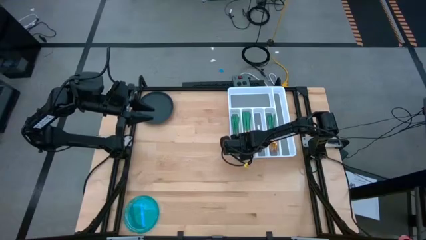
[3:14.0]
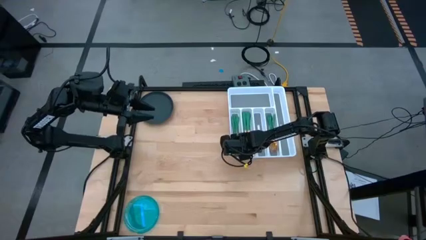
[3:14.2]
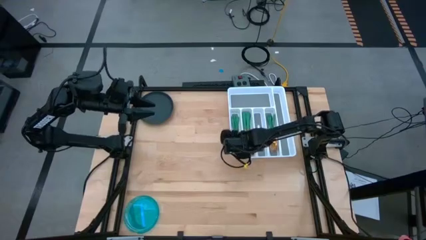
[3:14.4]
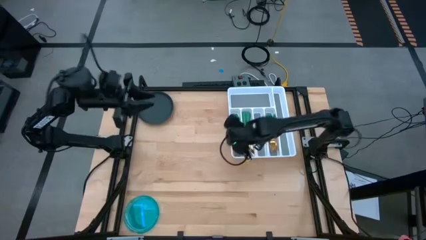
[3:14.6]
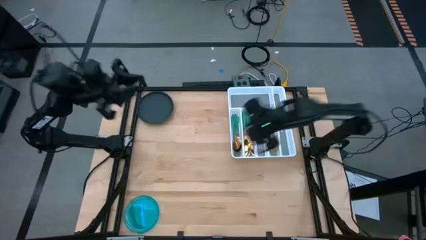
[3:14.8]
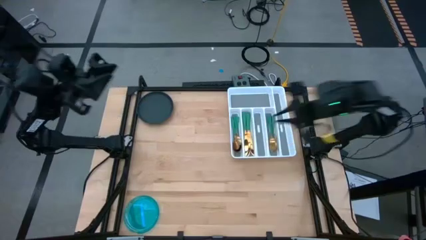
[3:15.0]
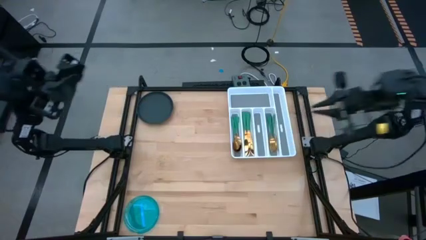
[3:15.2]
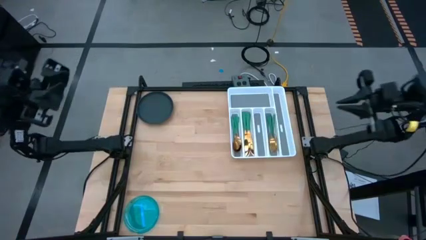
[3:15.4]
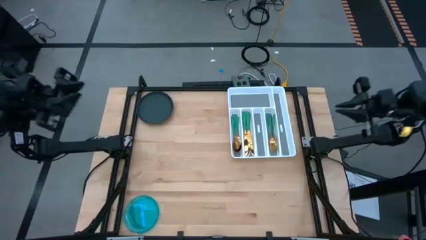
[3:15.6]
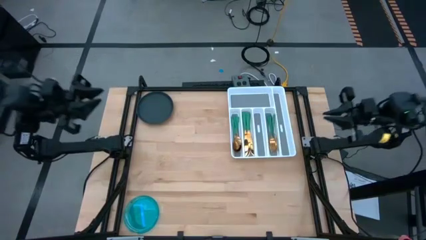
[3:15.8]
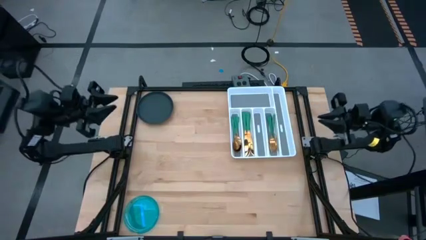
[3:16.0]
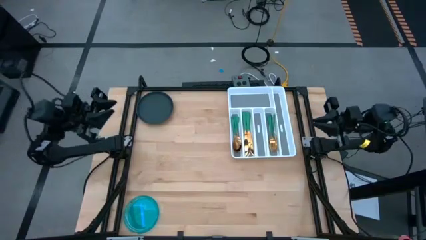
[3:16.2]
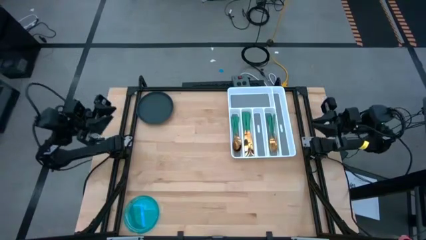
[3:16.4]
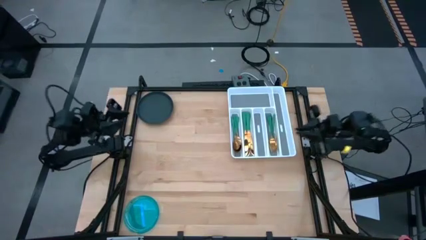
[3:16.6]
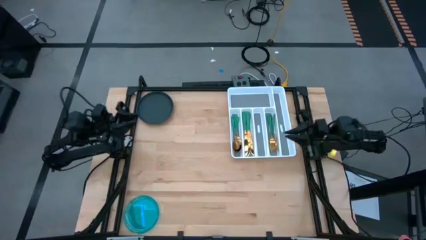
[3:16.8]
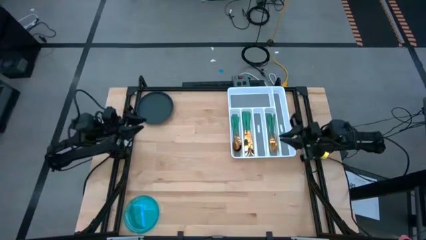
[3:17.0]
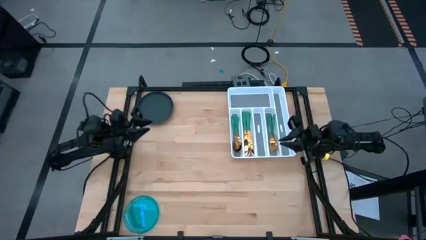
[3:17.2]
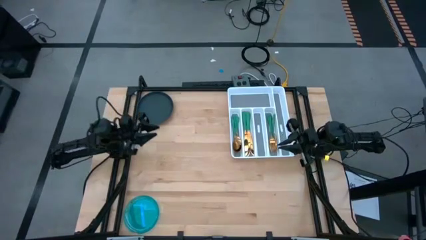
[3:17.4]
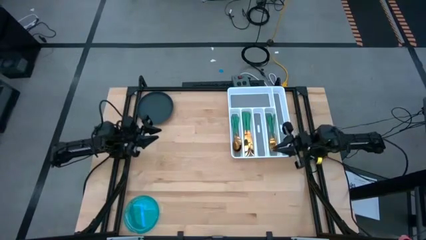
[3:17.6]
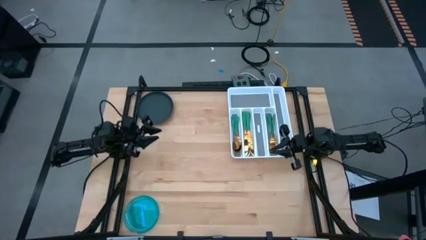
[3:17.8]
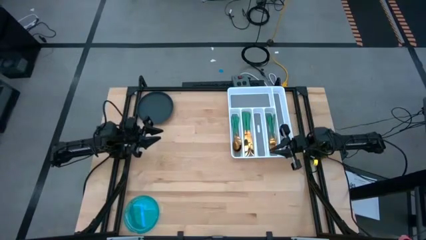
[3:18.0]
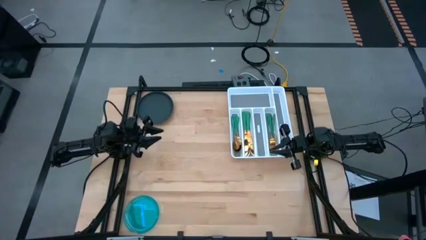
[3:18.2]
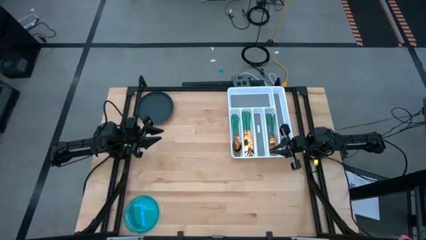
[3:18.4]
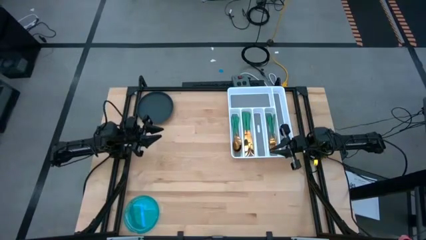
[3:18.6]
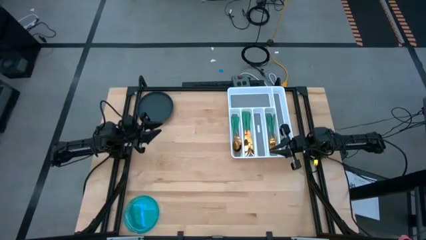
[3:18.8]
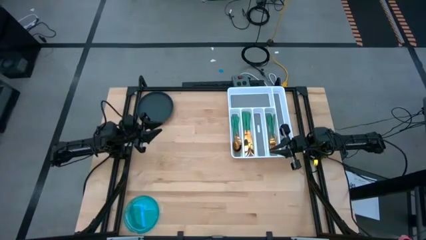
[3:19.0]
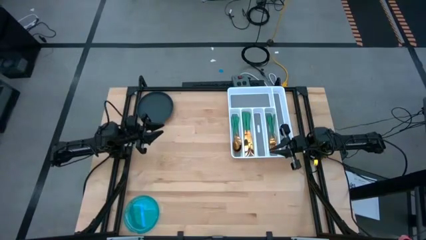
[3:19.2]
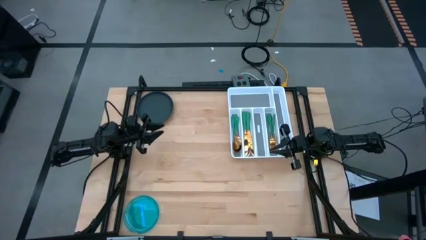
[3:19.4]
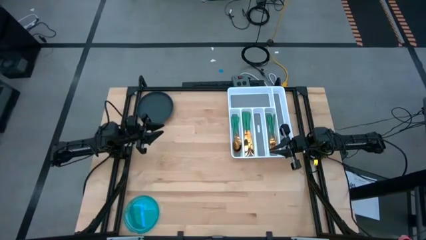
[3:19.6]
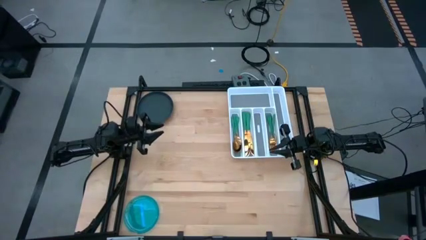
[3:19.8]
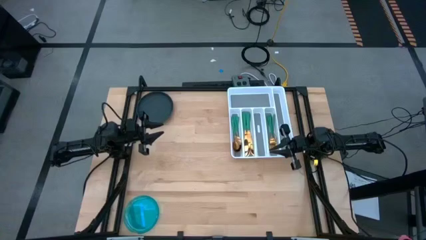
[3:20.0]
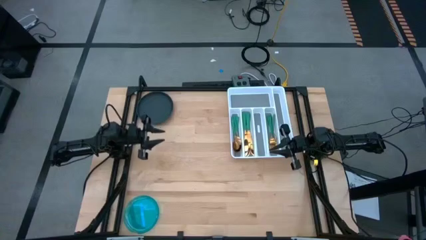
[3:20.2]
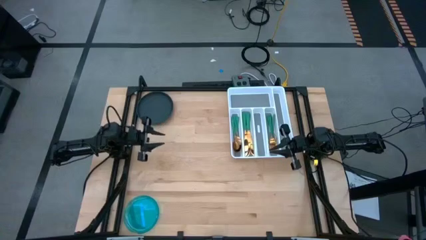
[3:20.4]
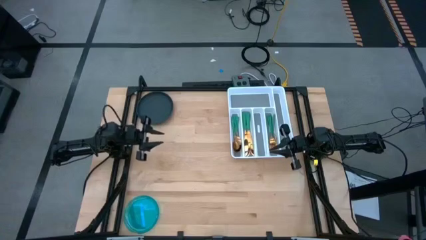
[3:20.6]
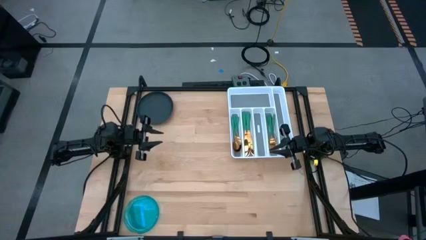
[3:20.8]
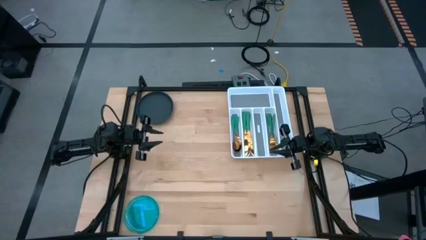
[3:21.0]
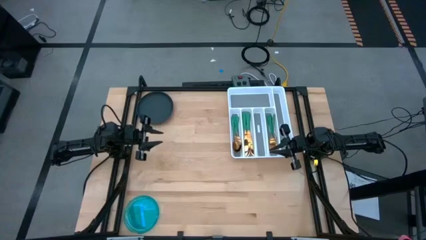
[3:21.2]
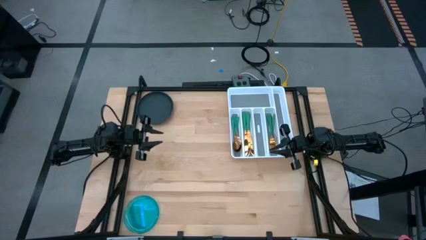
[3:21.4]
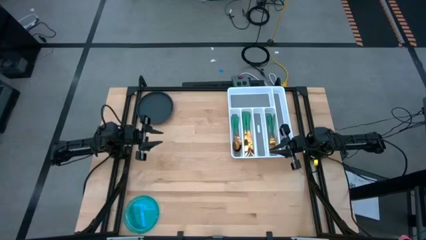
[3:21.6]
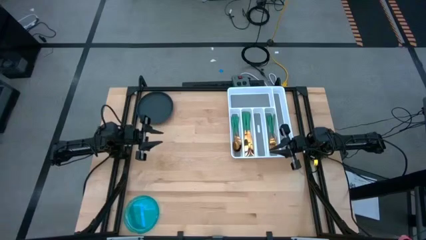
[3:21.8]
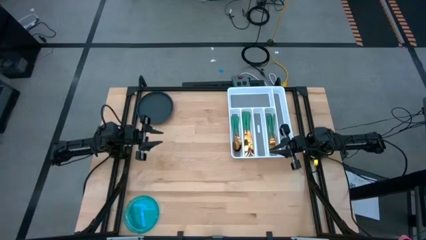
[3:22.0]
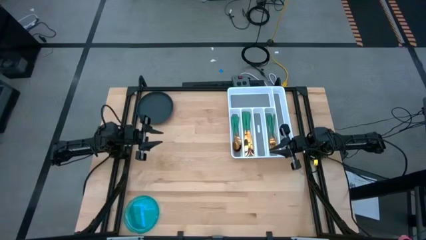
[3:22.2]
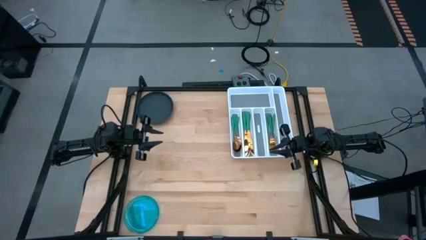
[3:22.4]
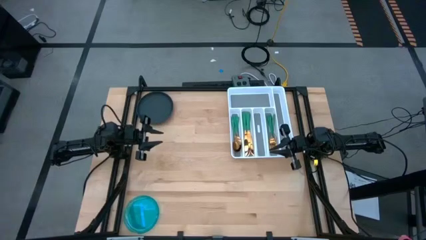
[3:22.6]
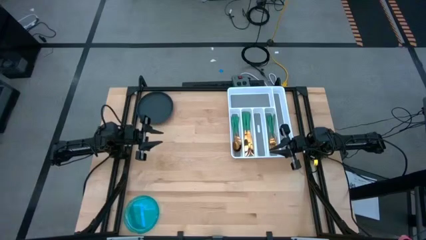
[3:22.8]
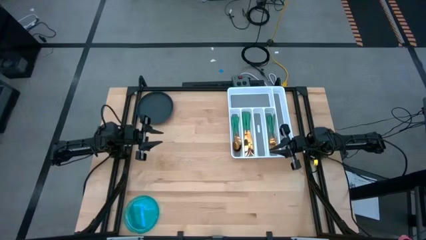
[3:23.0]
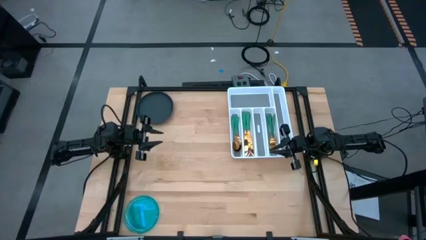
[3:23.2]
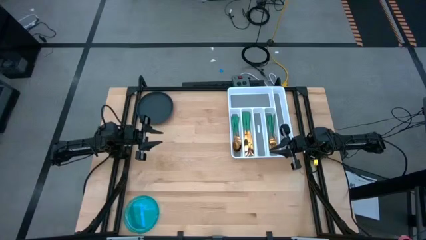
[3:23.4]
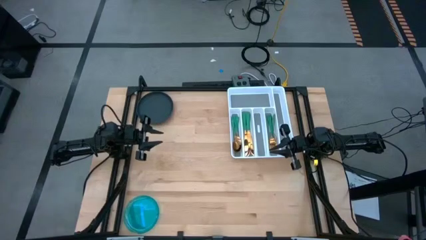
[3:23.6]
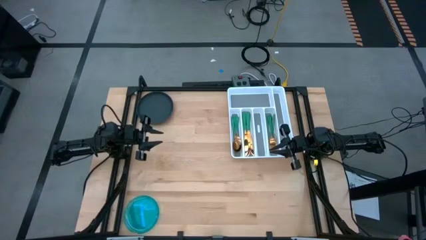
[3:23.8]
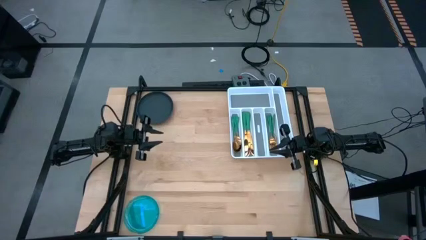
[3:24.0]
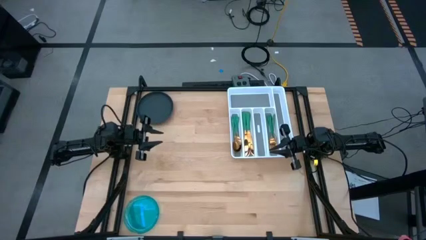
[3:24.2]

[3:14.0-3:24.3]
Task: Sort silverware
Return to Home Position
